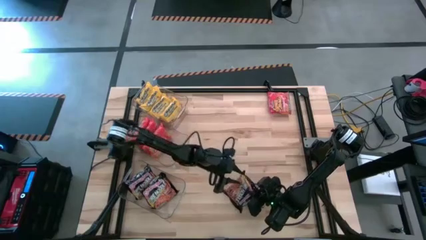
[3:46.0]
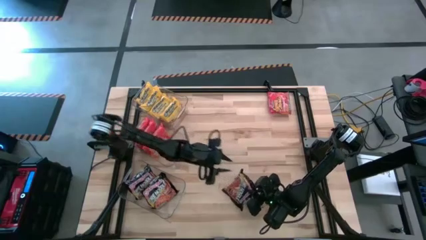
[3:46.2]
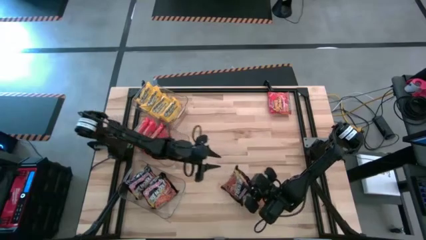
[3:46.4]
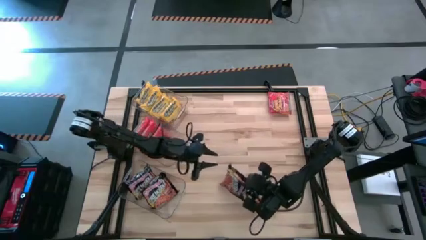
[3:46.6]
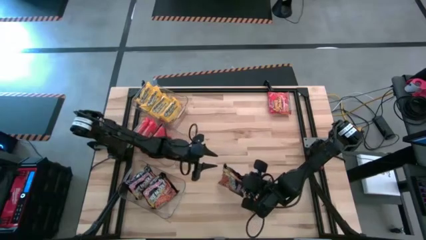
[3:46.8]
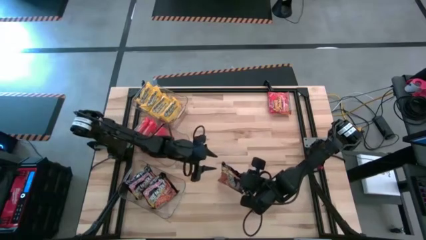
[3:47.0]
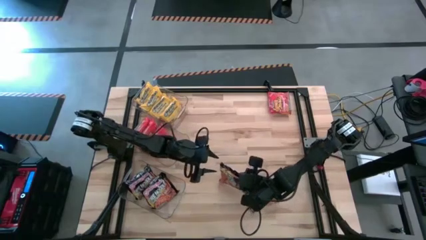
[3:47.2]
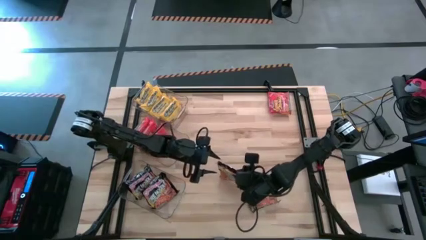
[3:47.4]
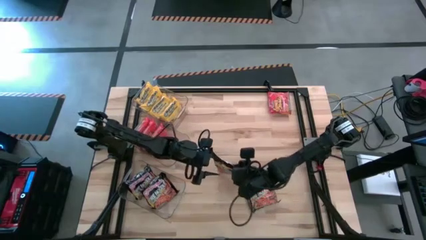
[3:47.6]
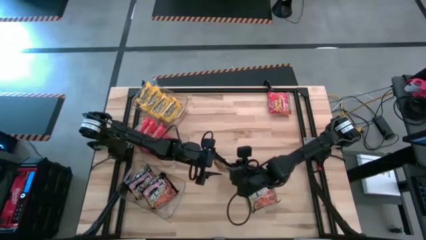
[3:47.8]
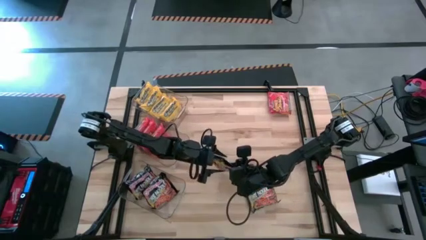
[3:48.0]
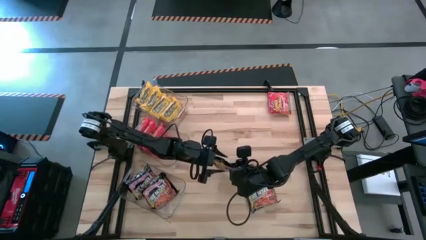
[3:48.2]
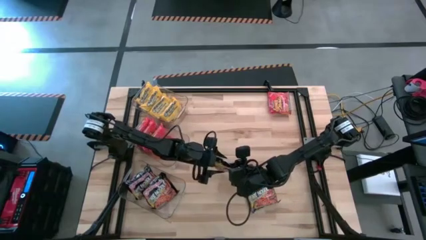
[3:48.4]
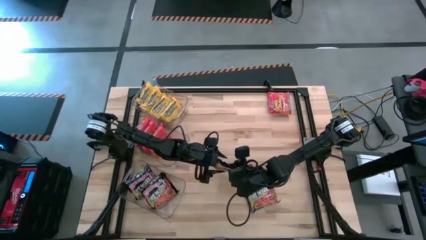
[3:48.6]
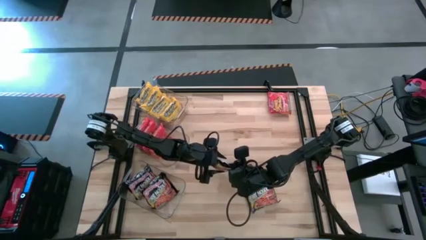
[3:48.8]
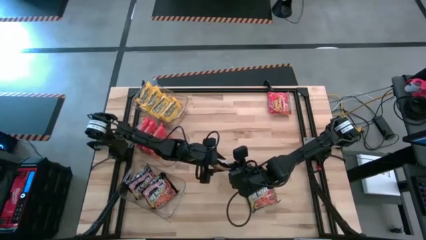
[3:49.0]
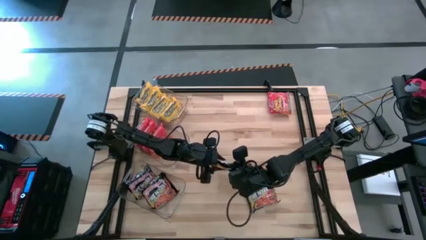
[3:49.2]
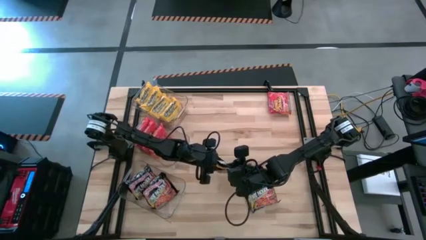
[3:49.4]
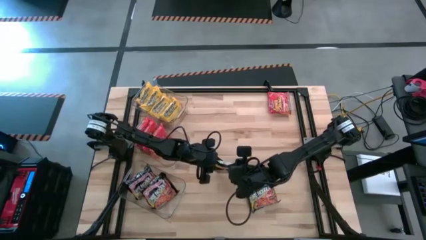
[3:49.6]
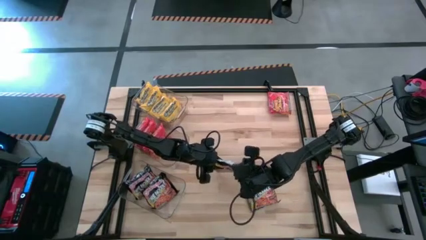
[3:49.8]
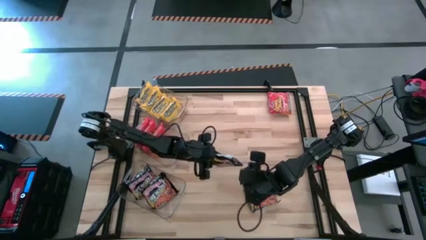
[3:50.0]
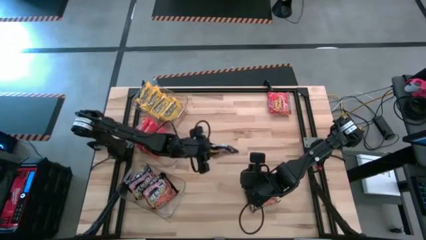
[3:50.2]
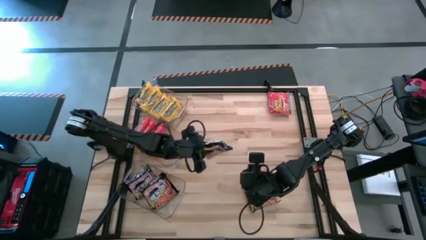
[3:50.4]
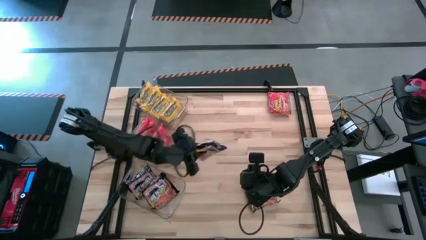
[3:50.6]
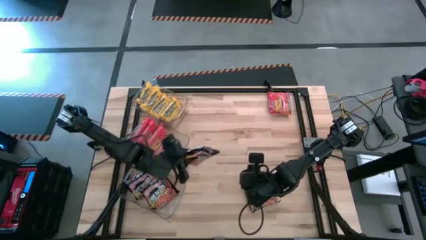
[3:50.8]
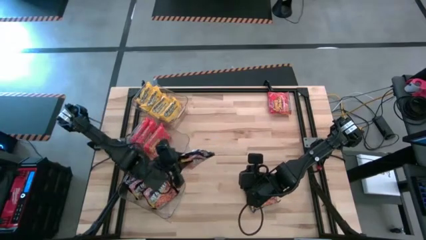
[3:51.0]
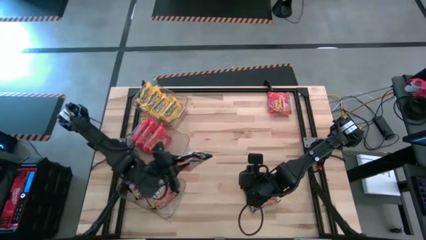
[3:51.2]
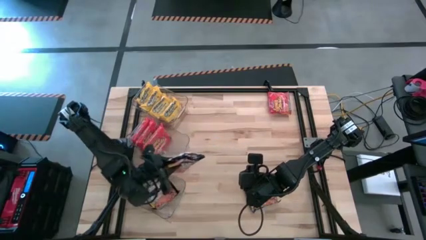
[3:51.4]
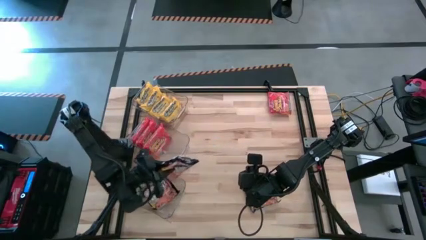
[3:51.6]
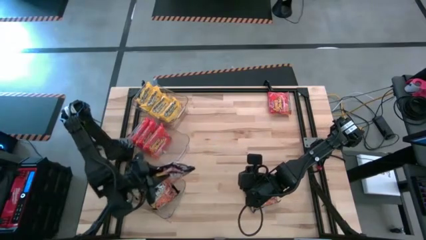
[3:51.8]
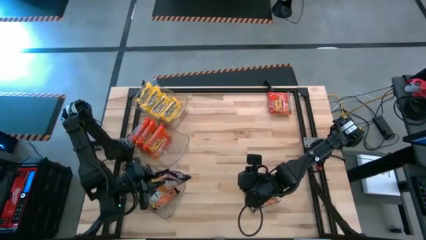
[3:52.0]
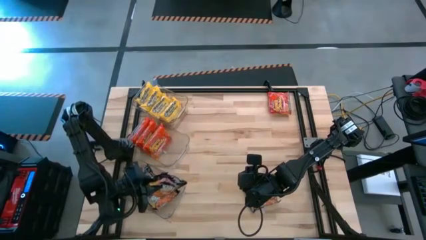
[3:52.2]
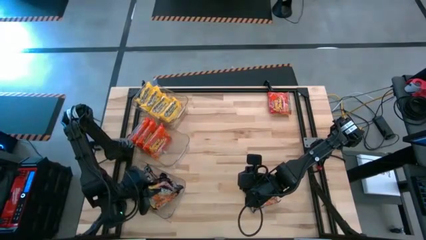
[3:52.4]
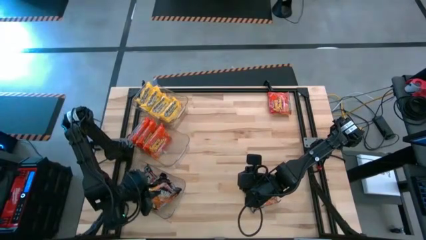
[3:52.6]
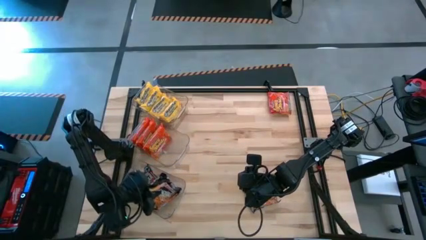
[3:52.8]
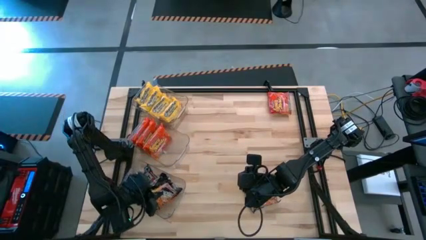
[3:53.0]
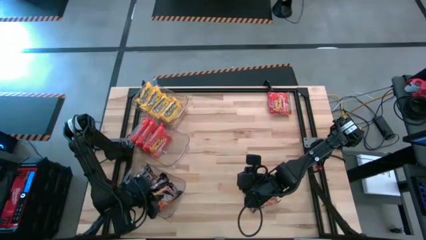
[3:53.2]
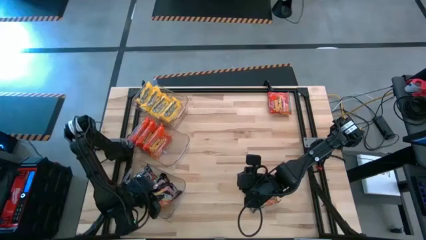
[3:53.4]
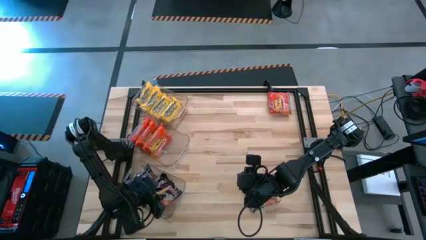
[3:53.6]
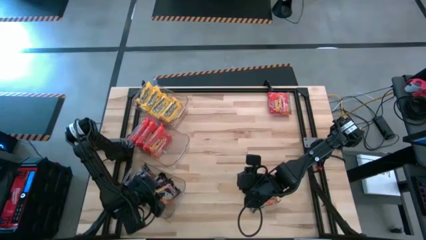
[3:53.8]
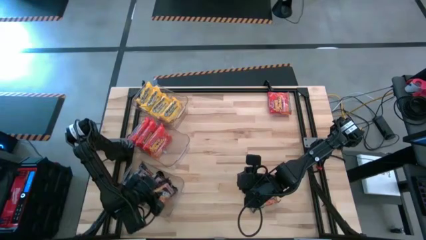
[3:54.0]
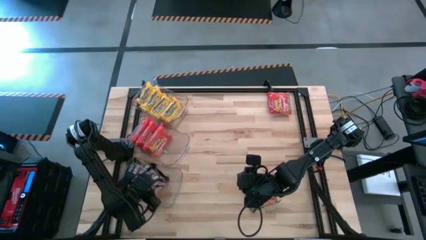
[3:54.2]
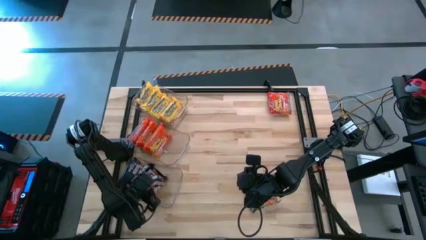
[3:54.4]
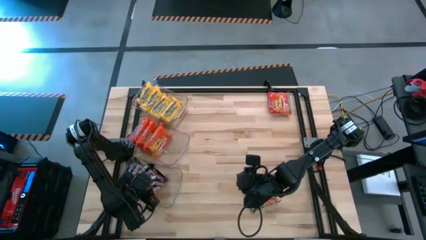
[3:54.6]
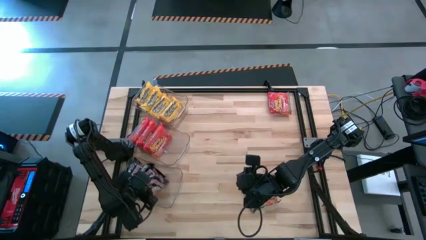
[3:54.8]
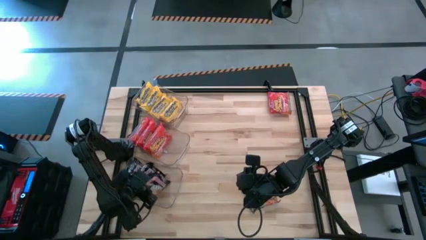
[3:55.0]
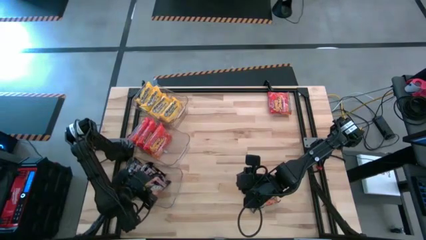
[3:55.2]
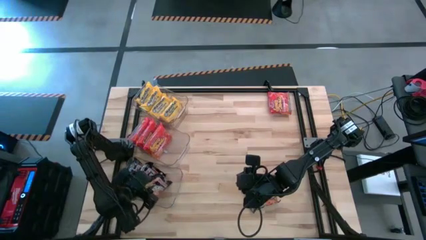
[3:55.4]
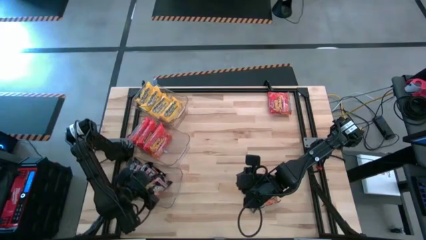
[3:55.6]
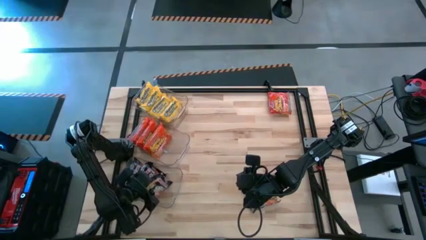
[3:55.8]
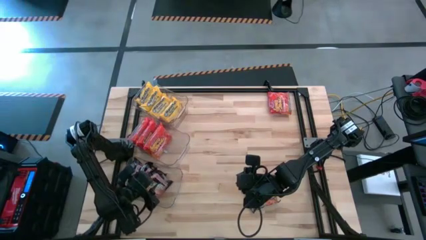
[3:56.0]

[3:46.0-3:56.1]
Task: Sort Maruchan noodles
Put the black noodles pack into the bottom transparent bin

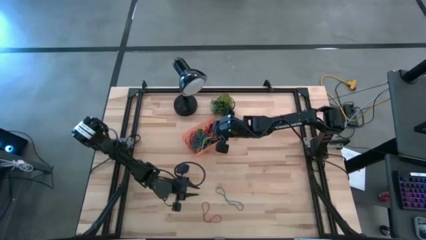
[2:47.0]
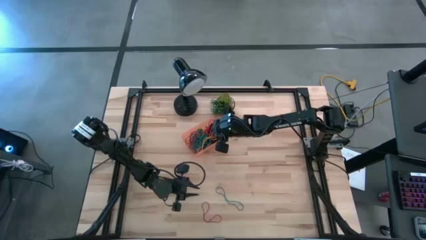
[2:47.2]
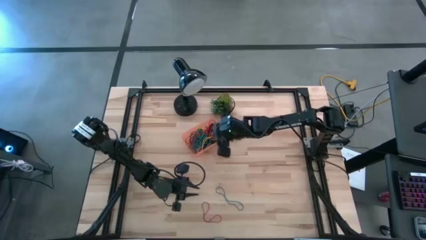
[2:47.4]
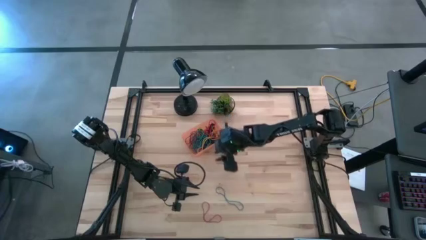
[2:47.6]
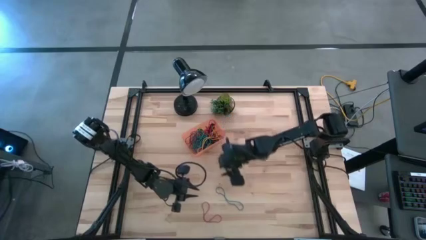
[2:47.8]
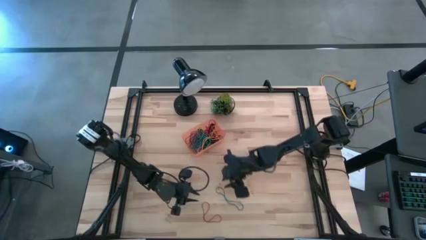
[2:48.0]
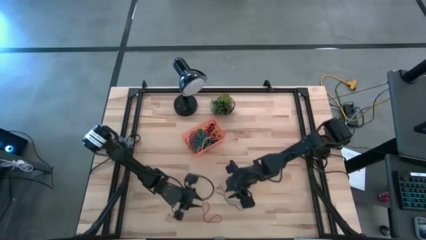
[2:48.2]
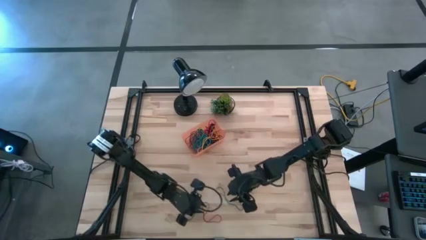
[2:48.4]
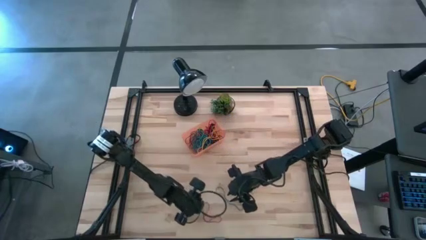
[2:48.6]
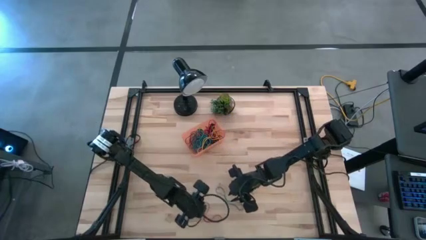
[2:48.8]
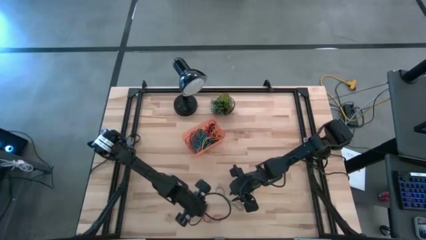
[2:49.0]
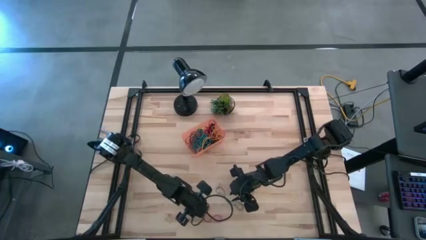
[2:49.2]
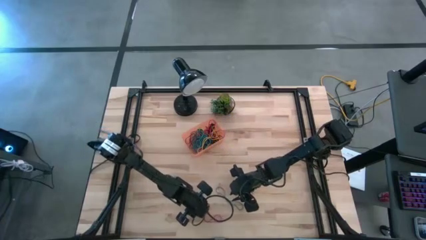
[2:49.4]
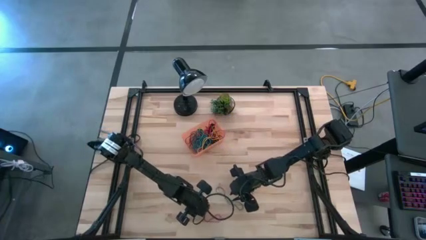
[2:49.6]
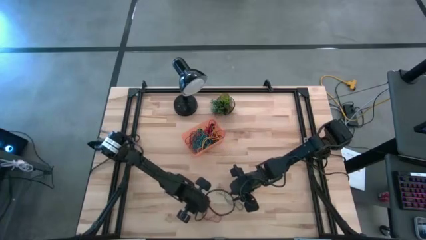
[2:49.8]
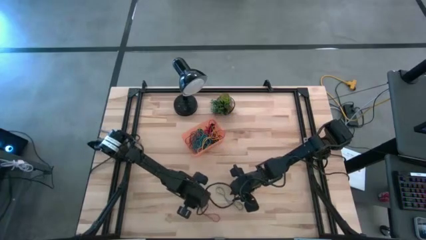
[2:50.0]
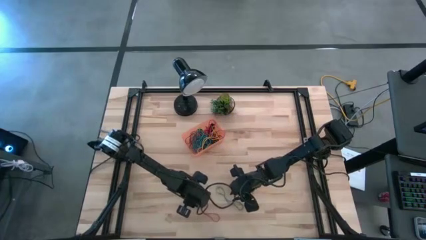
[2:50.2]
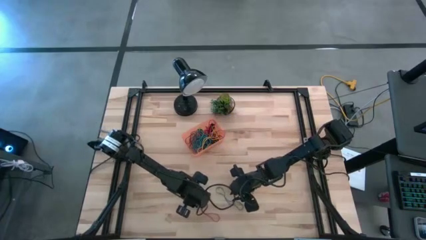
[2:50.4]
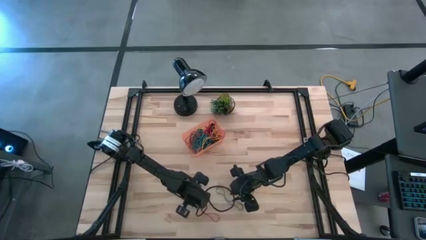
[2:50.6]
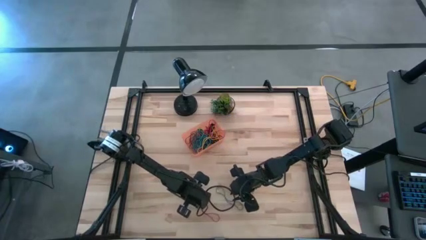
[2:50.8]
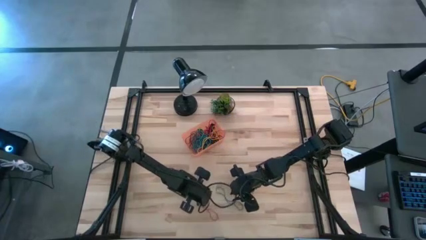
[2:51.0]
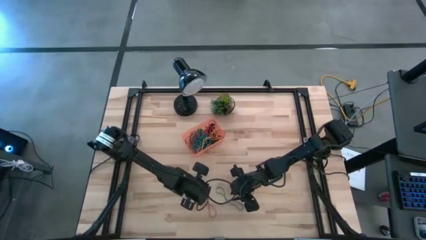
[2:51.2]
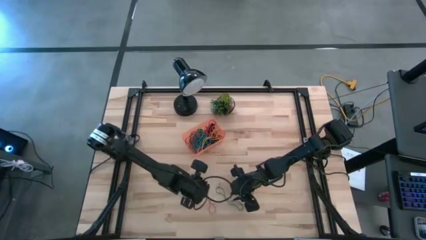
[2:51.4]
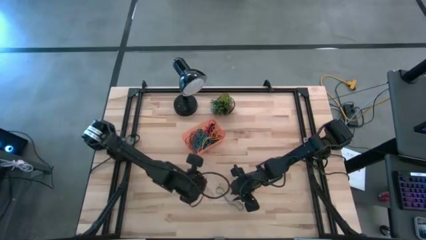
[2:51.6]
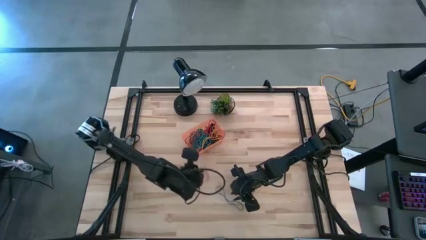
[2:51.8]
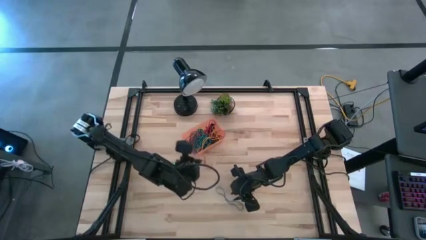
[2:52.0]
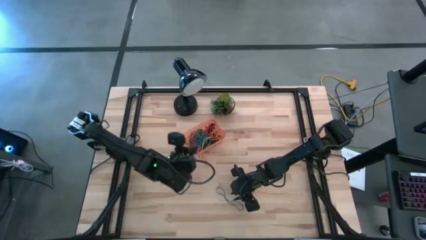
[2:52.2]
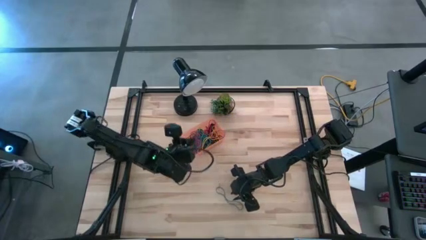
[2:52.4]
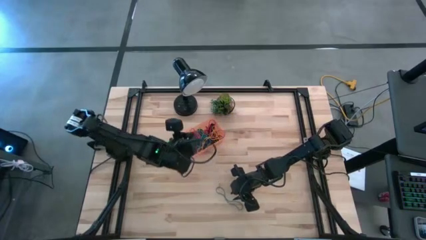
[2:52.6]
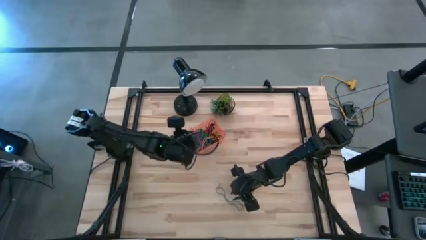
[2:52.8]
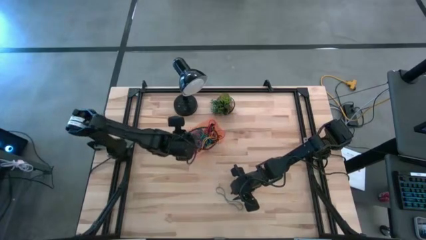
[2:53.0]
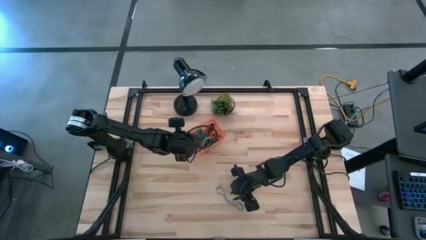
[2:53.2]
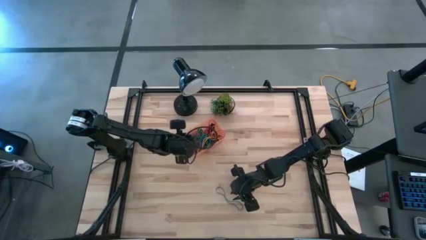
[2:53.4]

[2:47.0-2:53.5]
Task: Pick and place rubber bands into bin
Put the red rubberband into the orange bin
